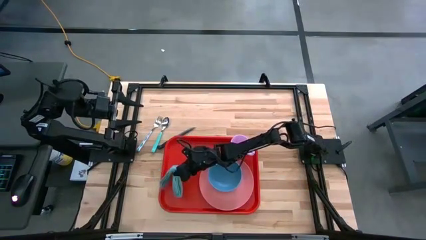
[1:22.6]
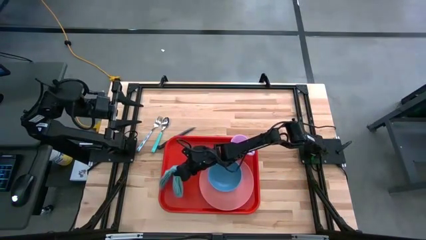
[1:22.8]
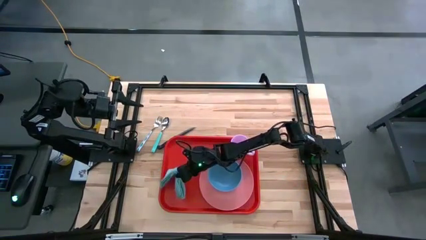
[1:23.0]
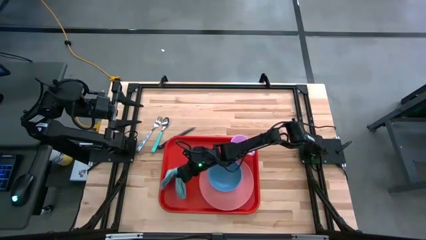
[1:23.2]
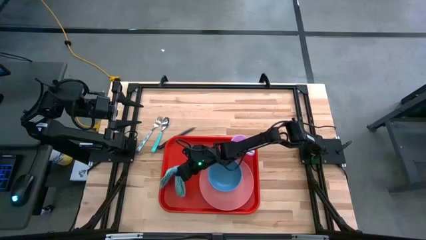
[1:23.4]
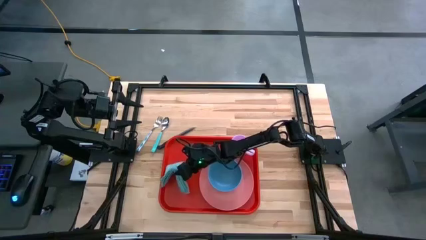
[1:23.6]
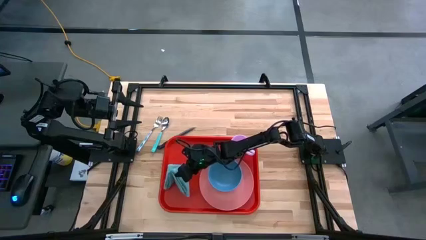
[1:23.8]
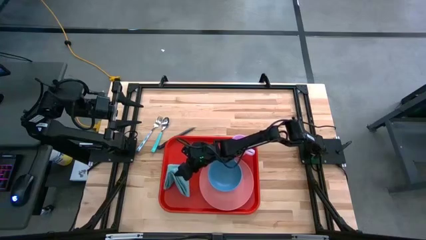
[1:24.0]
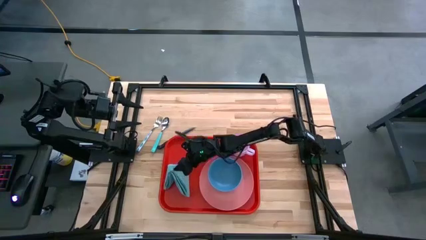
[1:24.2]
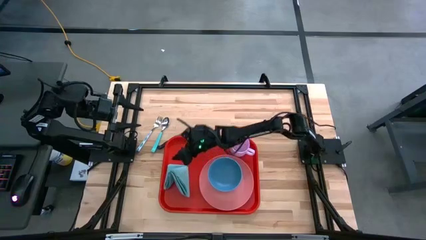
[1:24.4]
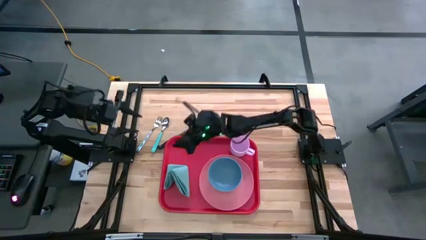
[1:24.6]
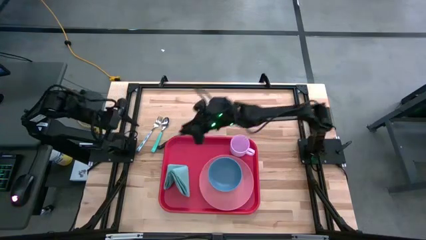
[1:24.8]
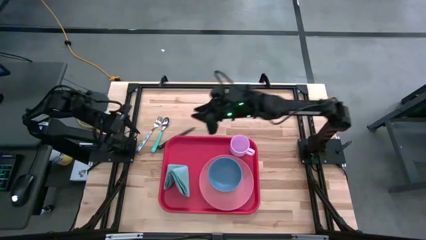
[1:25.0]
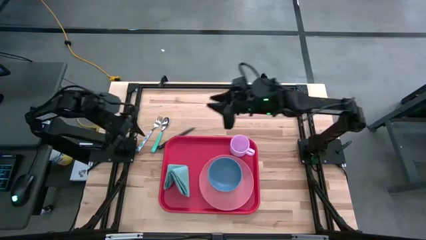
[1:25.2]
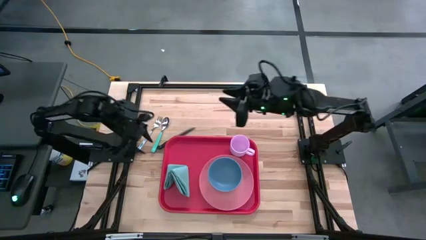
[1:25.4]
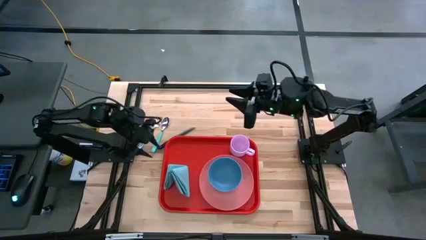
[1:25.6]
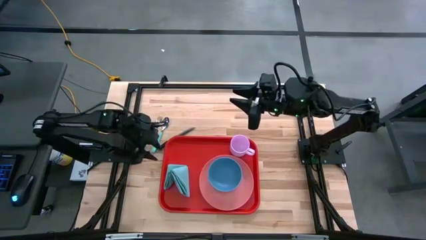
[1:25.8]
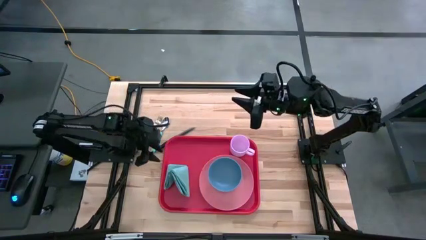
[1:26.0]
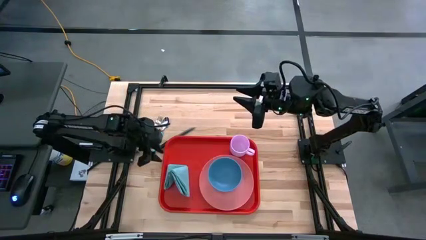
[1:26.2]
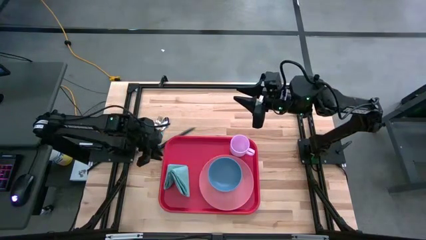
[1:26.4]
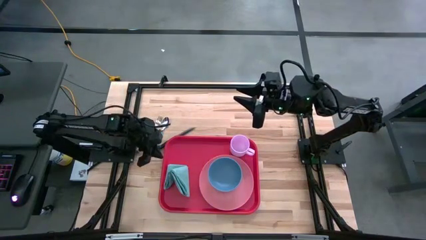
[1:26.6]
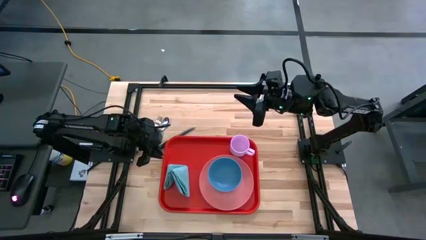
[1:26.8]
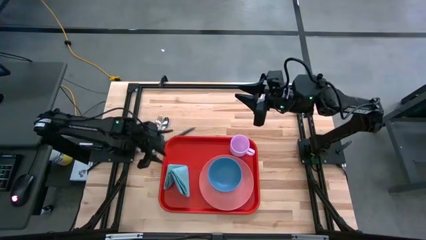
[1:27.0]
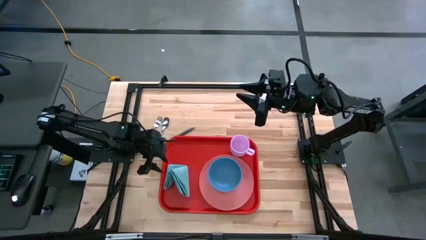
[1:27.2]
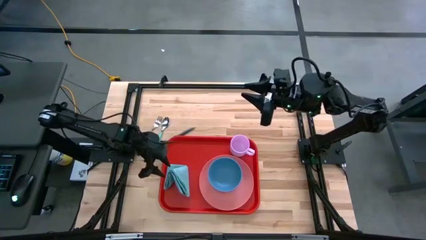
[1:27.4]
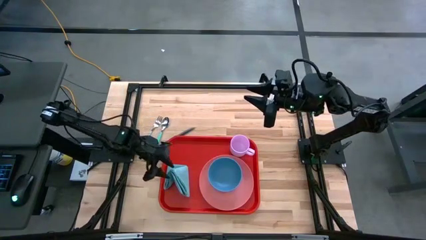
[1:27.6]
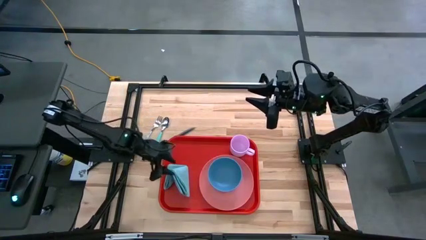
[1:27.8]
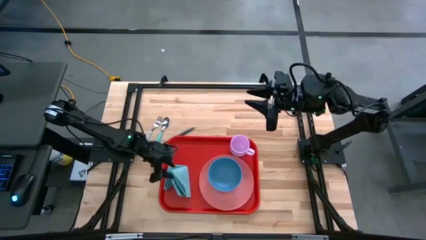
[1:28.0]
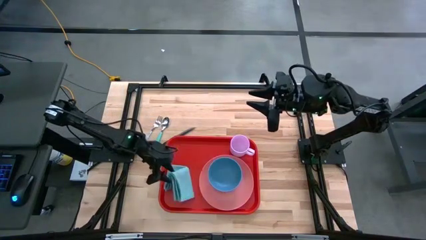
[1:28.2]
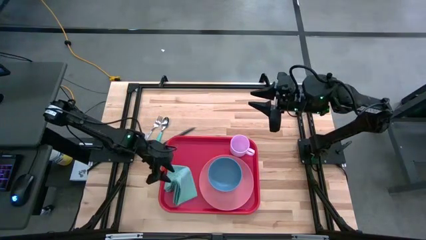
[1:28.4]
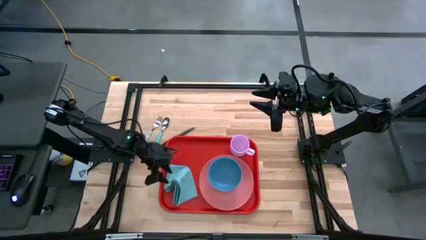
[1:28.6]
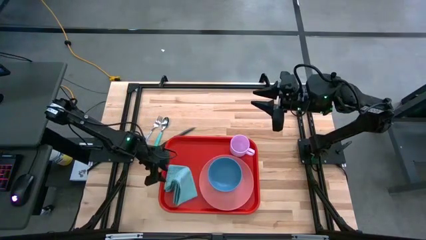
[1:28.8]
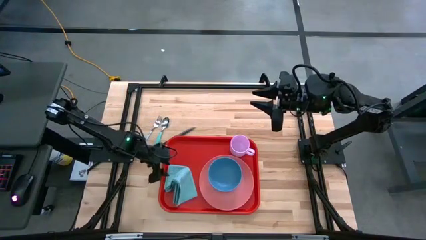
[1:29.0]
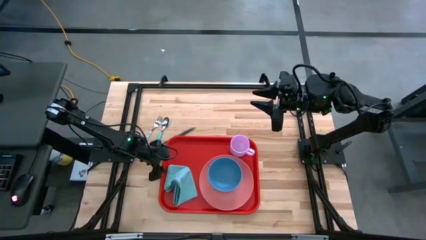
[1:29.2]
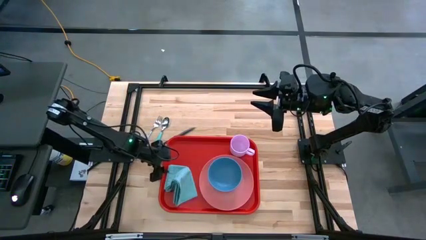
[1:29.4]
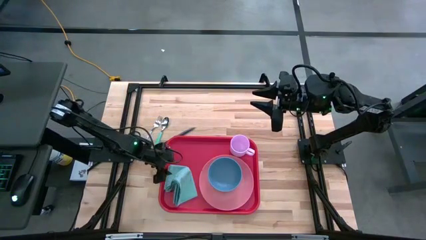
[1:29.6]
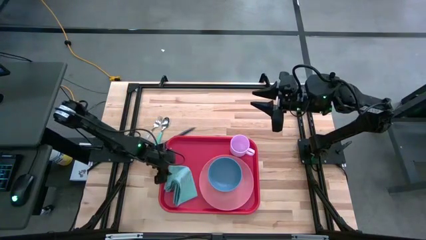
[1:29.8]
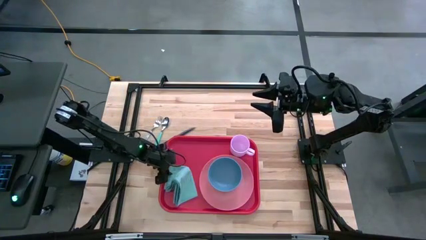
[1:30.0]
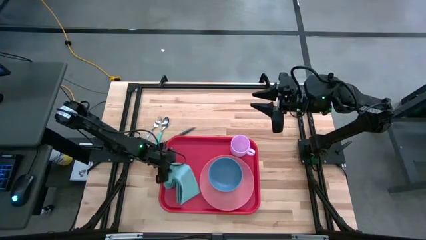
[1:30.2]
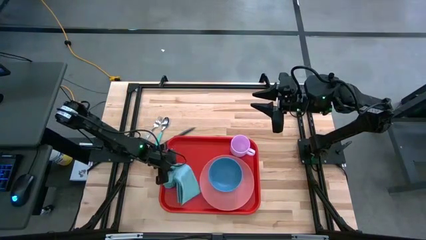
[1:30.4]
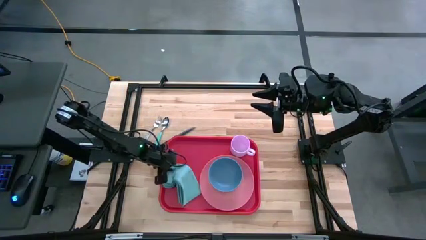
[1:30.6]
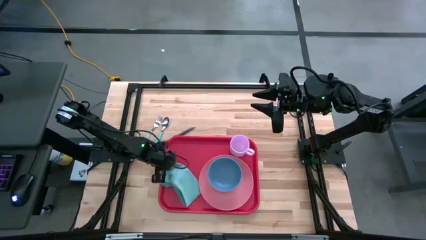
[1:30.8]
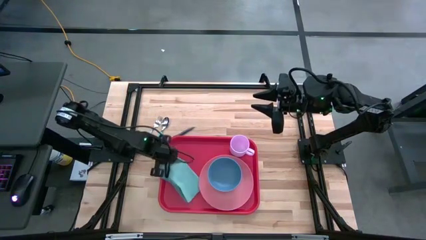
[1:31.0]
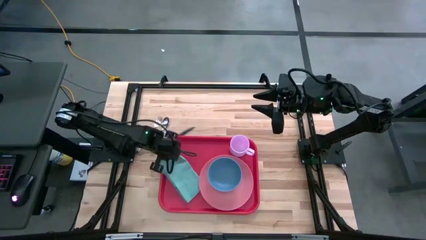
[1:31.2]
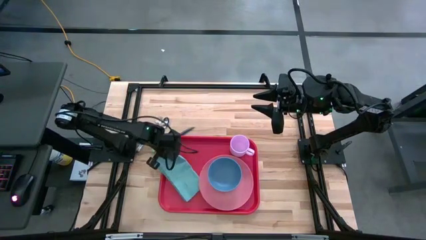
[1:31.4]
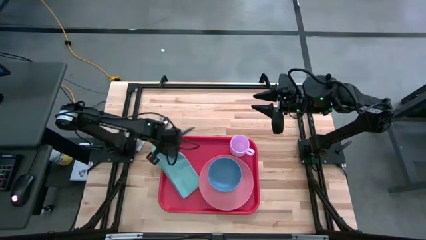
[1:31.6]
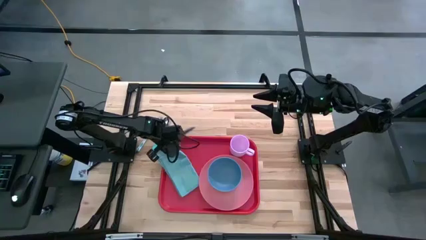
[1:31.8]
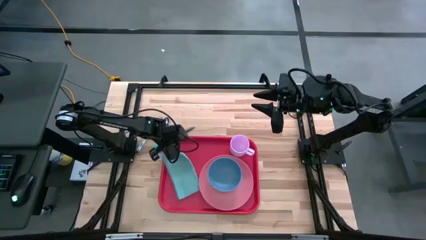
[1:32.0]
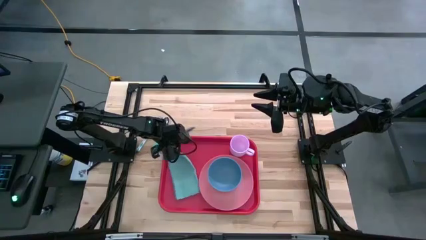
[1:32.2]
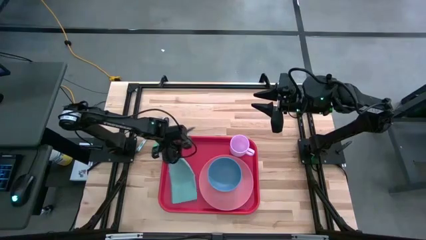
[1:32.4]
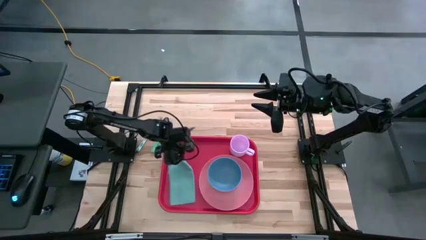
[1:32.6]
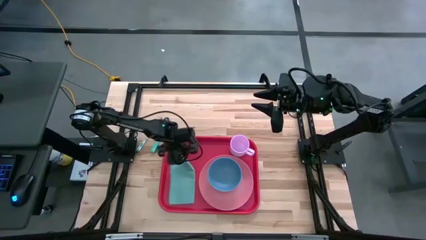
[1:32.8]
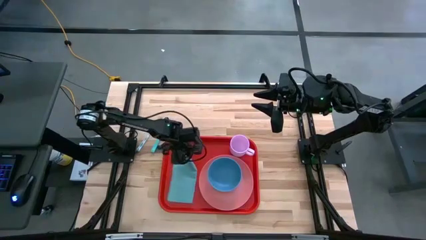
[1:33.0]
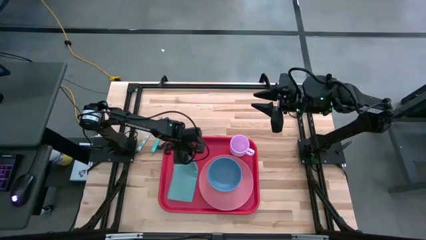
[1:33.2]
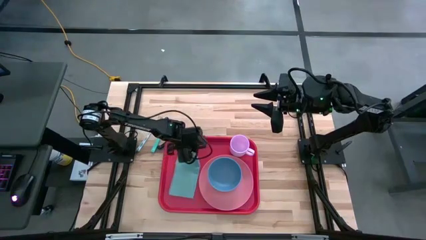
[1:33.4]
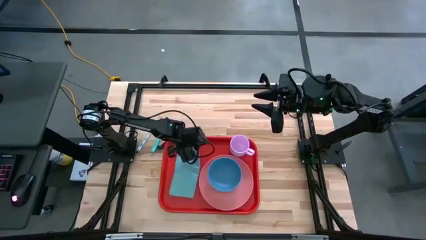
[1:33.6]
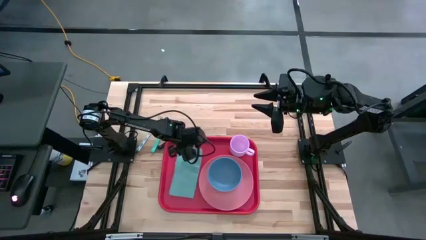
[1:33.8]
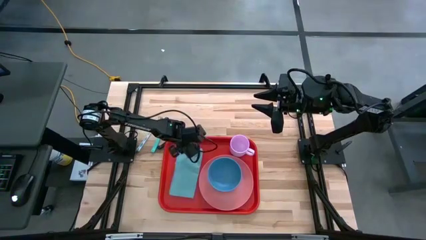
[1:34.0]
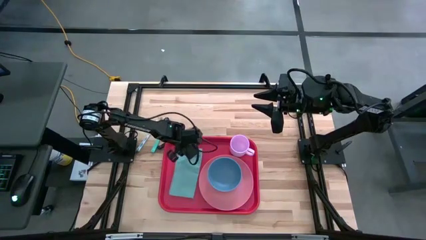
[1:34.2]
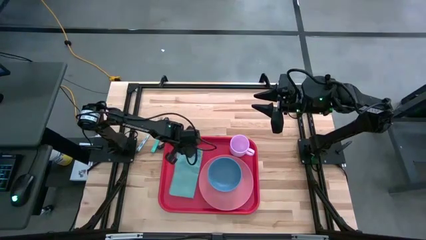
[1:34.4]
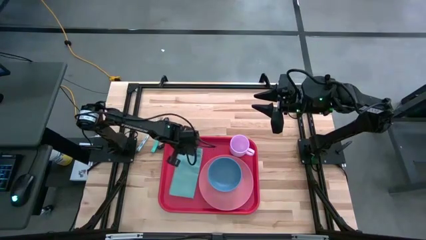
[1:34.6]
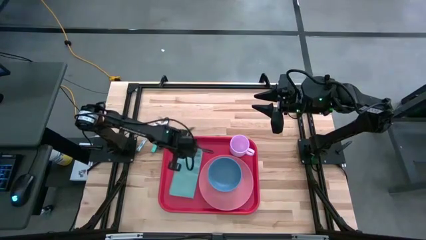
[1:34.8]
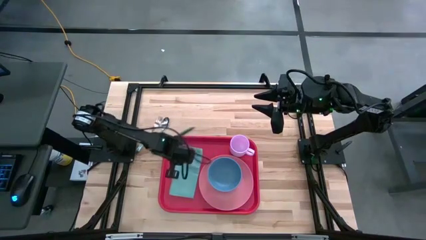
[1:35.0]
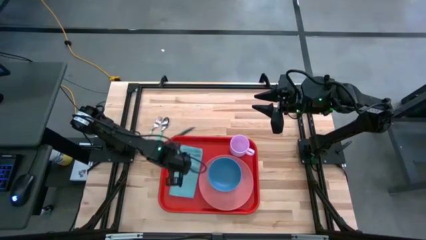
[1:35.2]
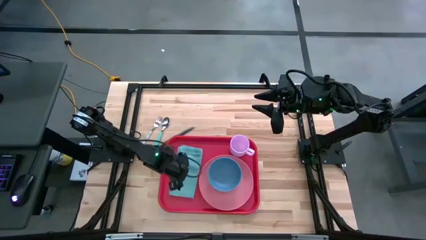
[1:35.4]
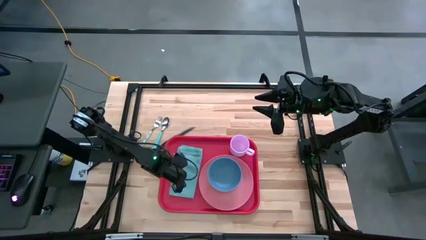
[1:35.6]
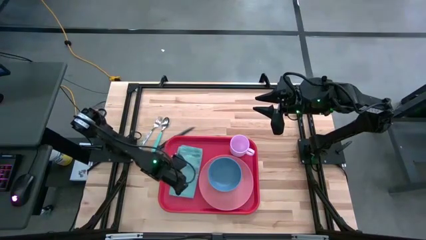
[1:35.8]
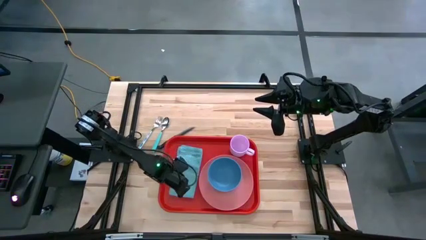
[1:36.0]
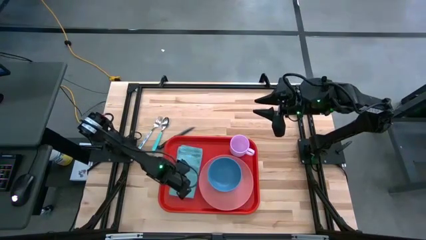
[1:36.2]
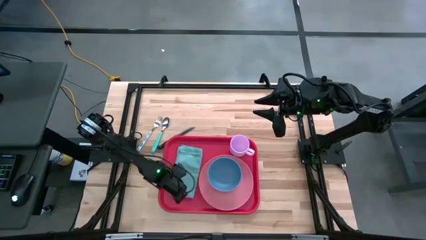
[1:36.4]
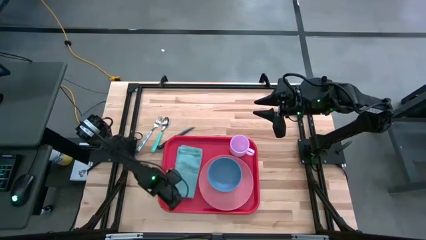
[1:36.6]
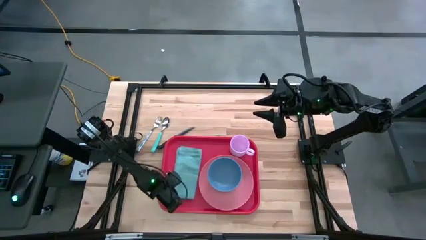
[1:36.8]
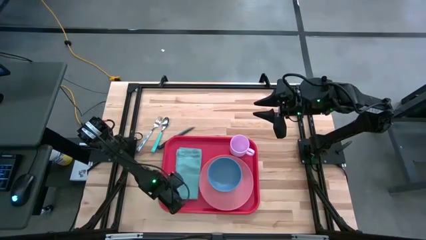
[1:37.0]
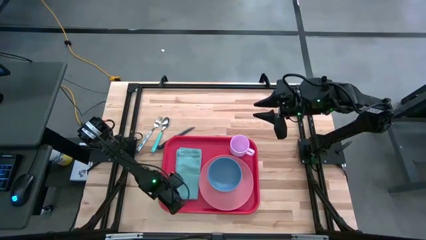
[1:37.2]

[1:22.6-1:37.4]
Task: Set up tray
Put the blue napkin into the pink serving tray
